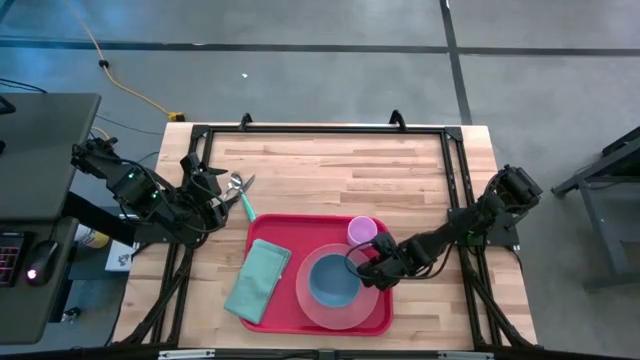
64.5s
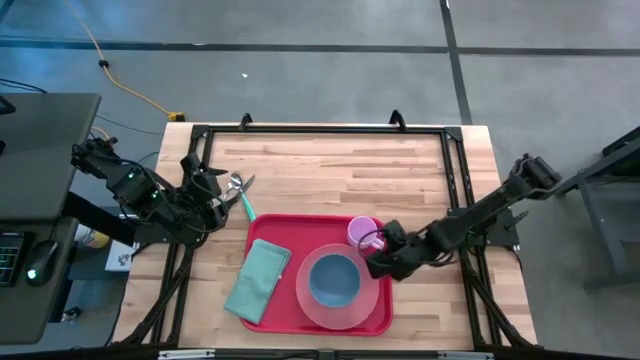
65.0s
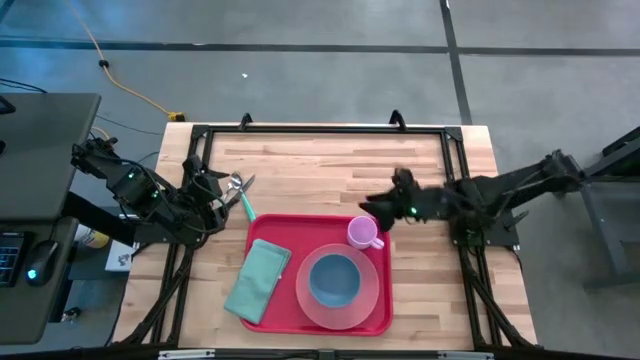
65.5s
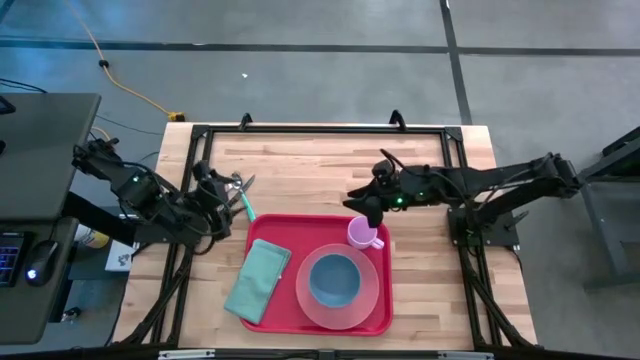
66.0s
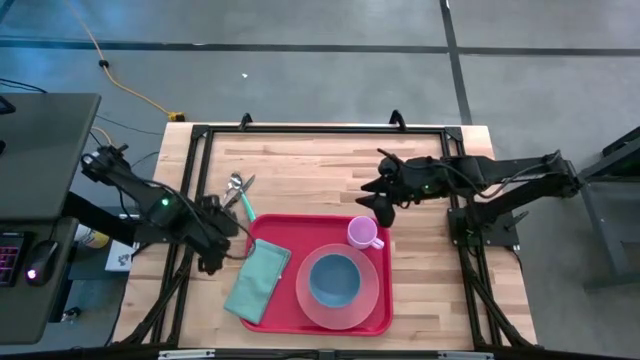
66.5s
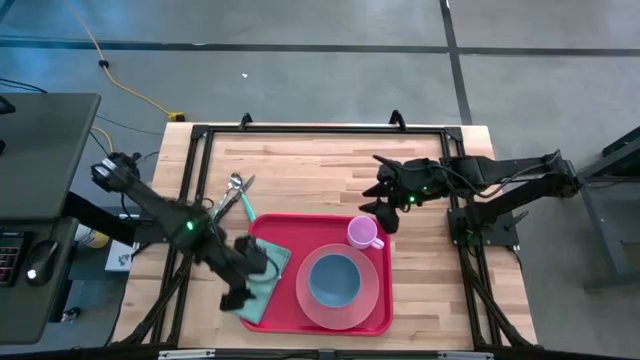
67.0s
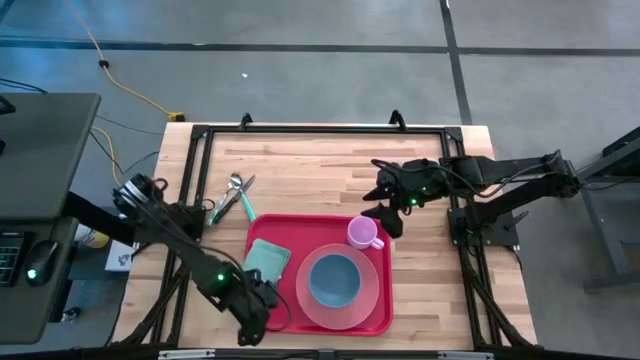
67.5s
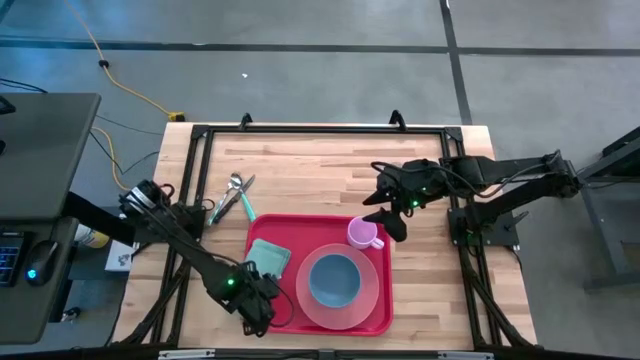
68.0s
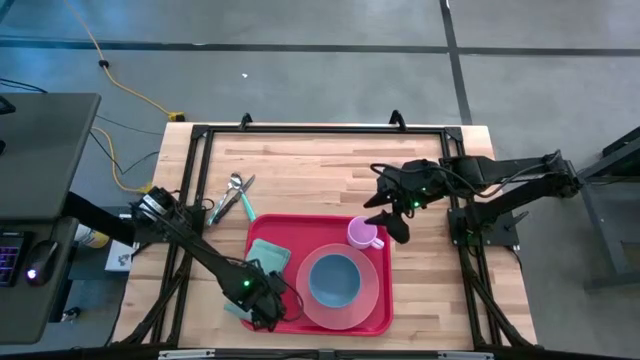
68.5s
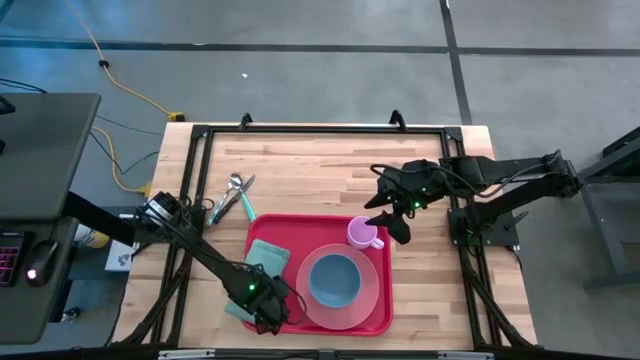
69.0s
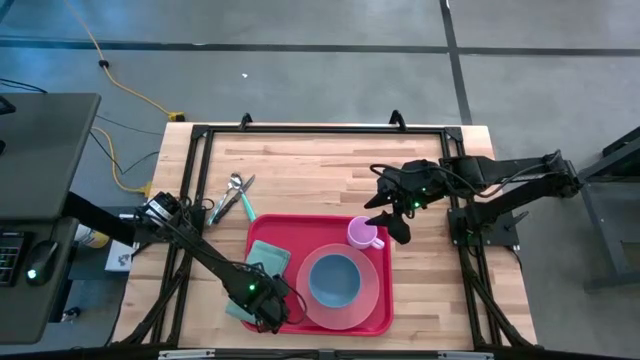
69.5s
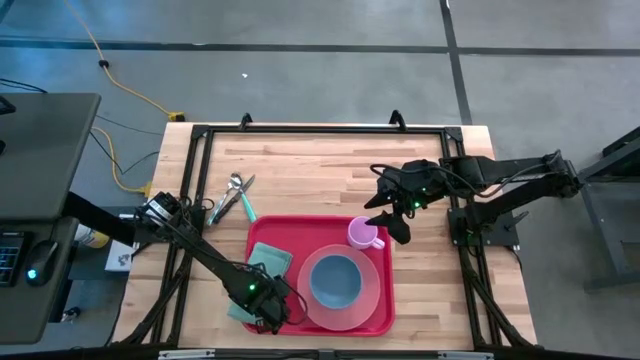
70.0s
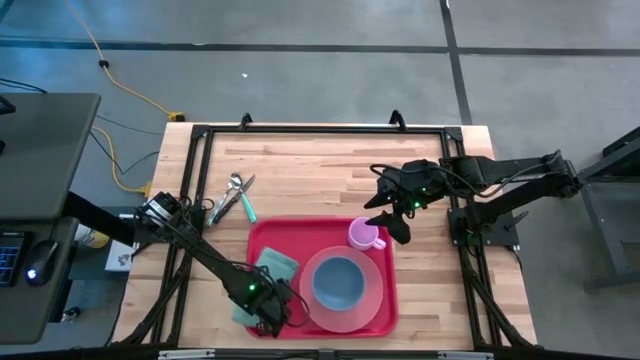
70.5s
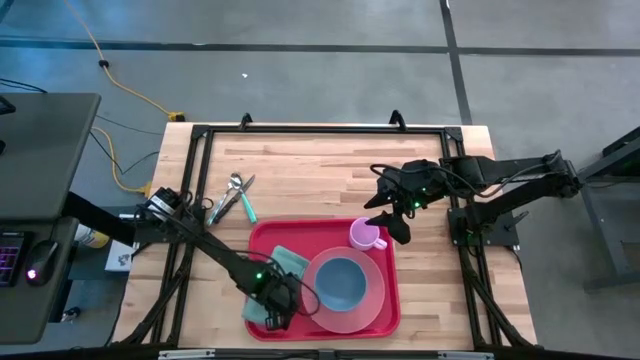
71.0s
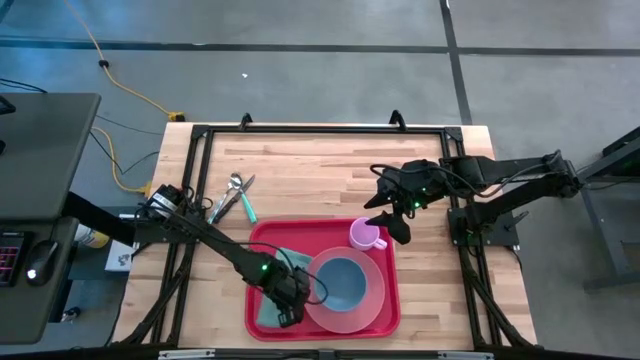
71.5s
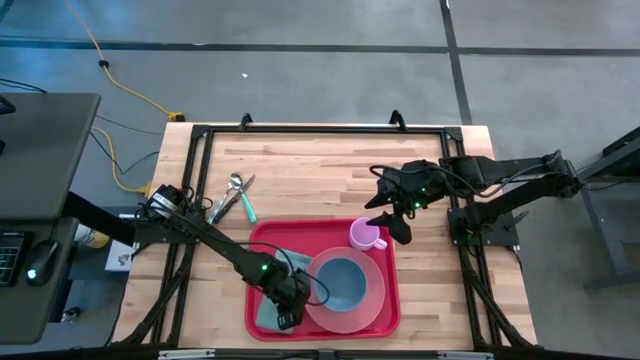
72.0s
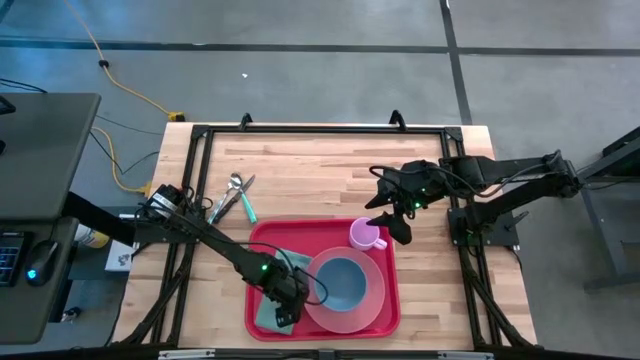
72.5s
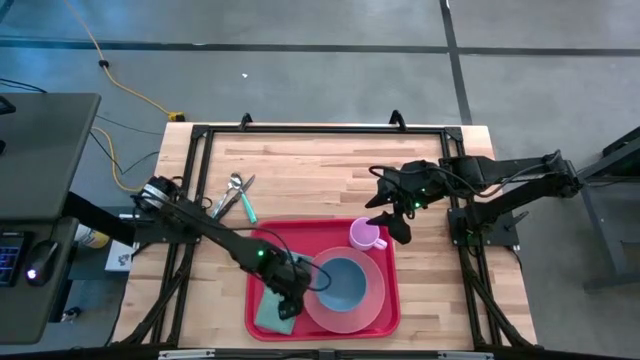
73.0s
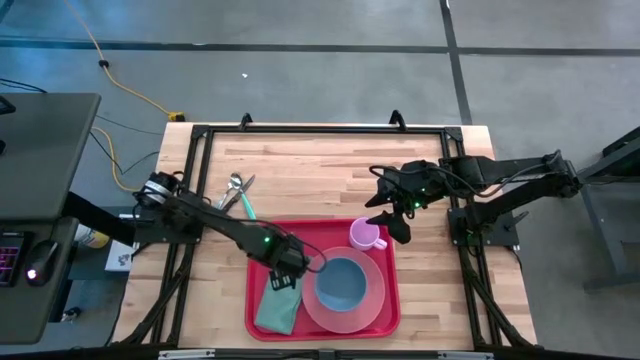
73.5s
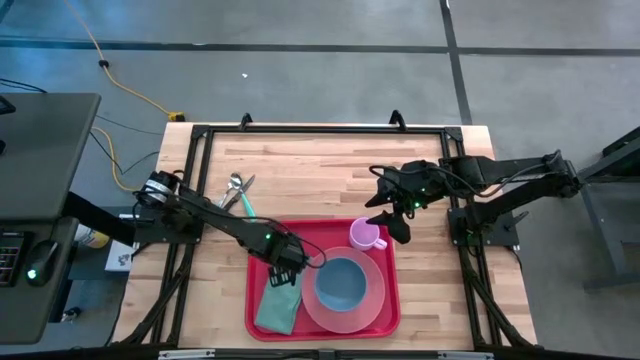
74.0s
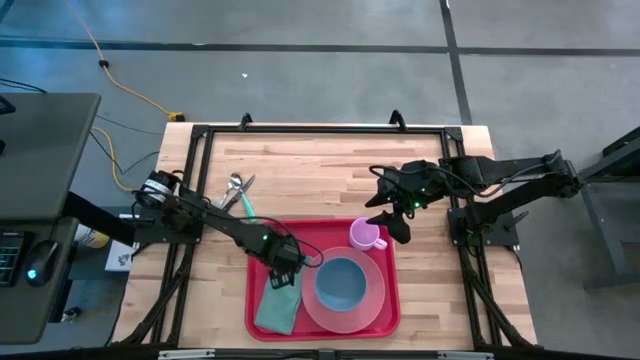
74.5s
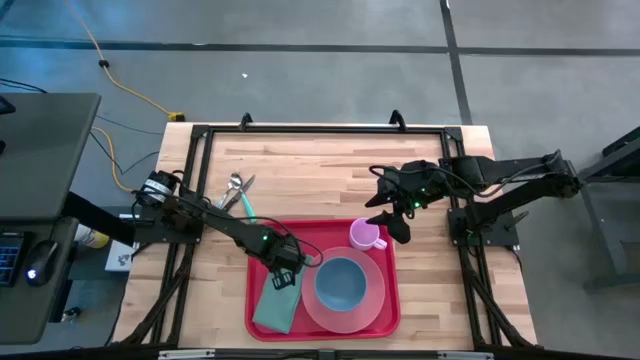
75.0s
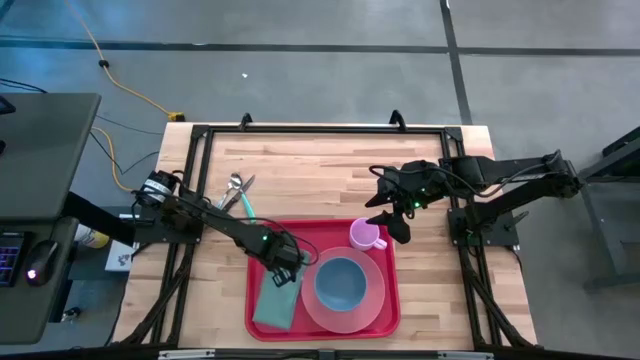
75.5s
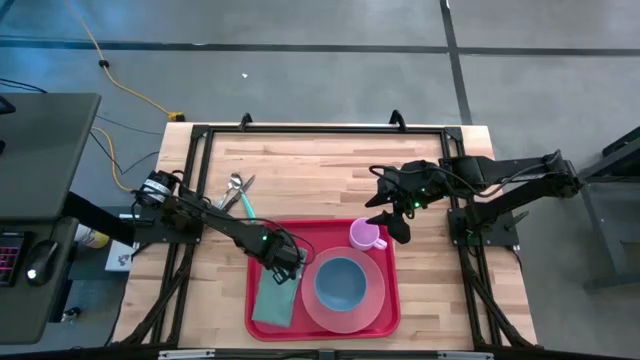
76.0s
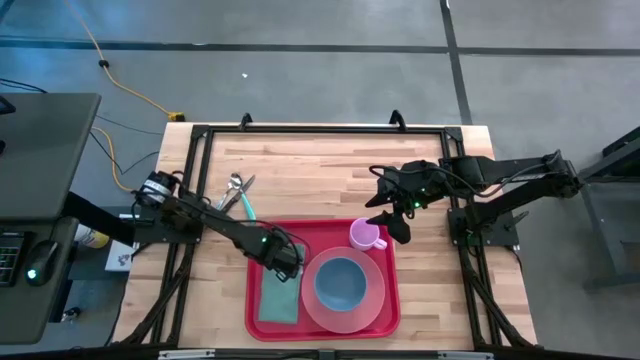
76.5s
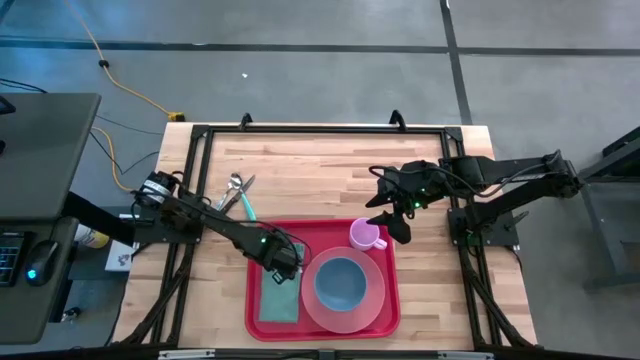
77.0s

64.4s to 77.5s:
Task: Set up tray
Adjust the light blue table napkin on the red serving tray

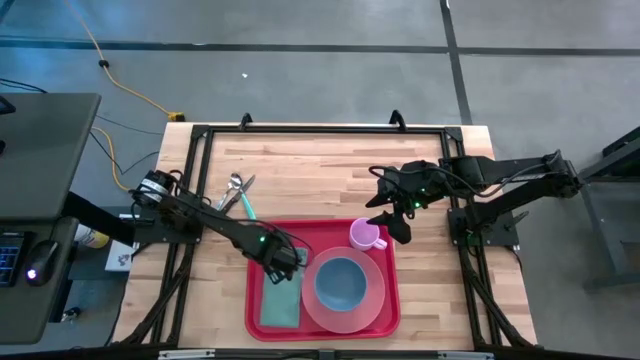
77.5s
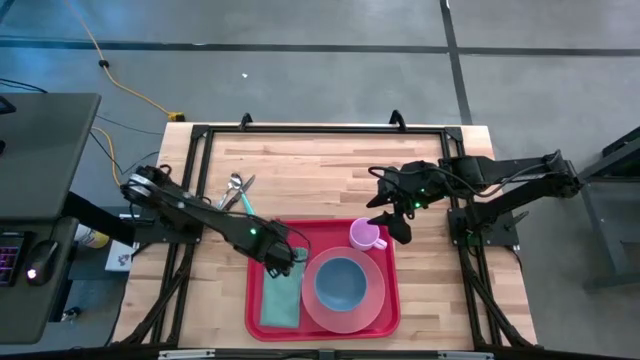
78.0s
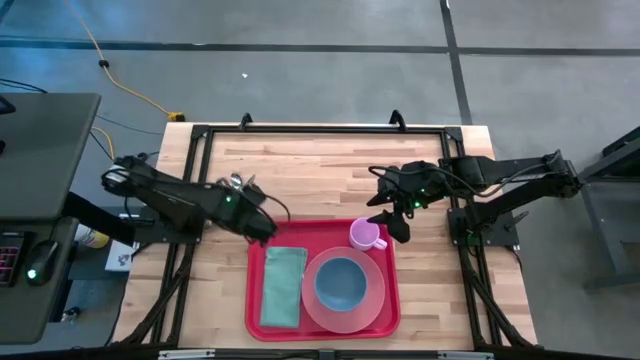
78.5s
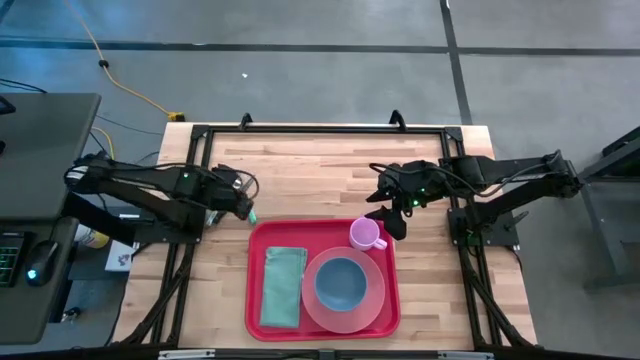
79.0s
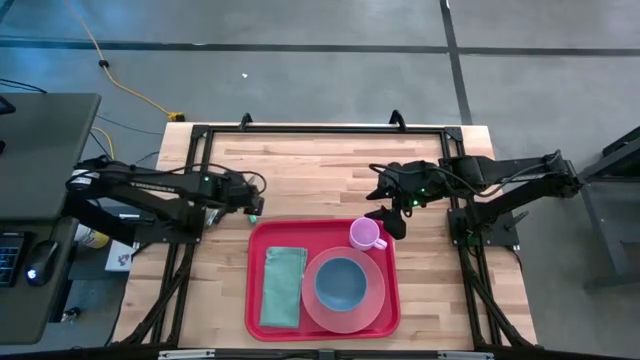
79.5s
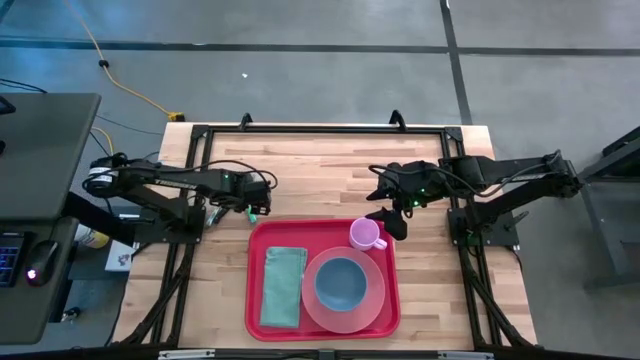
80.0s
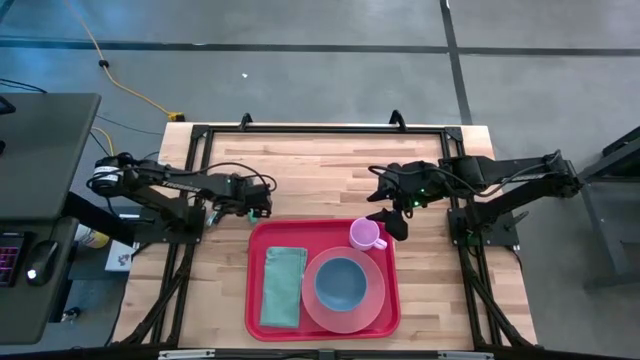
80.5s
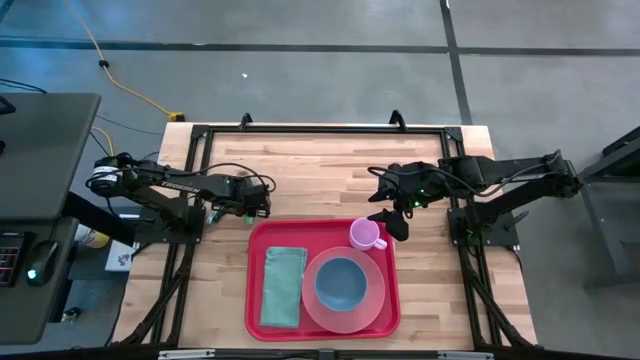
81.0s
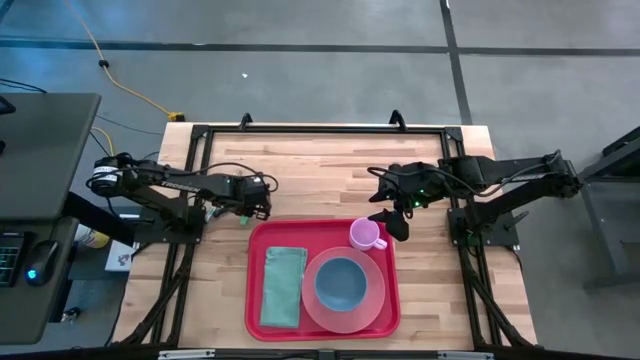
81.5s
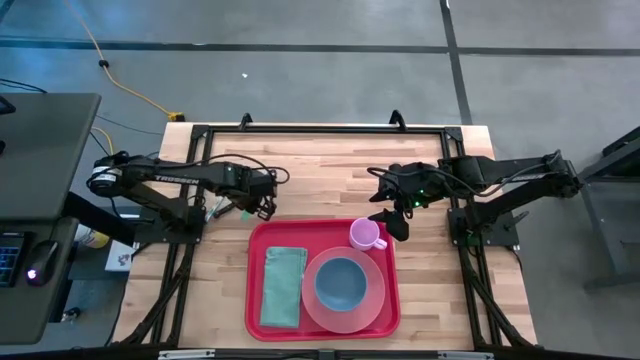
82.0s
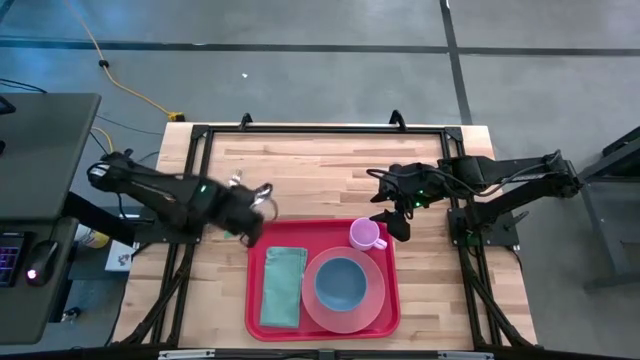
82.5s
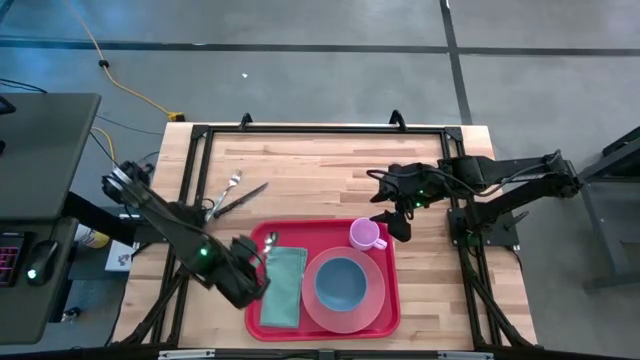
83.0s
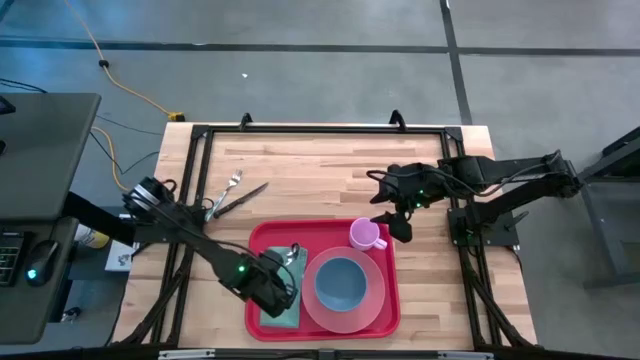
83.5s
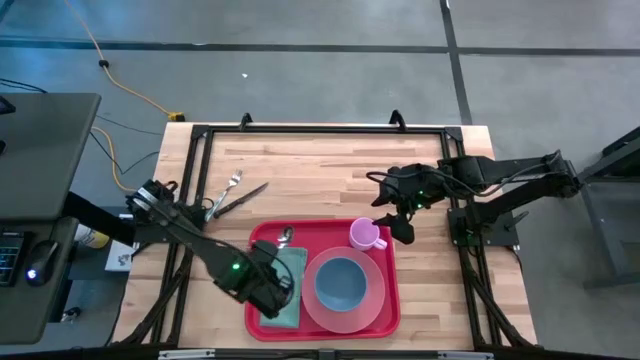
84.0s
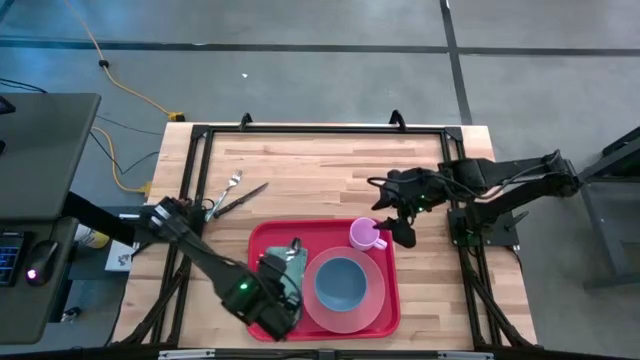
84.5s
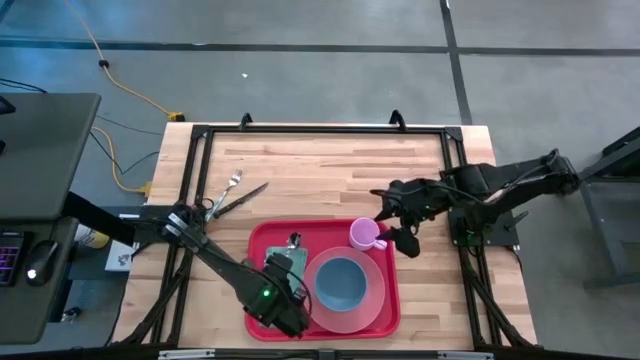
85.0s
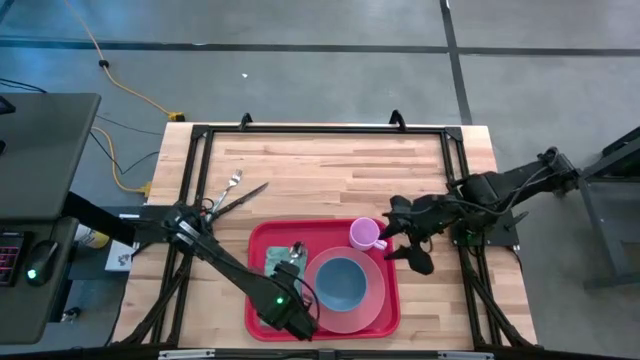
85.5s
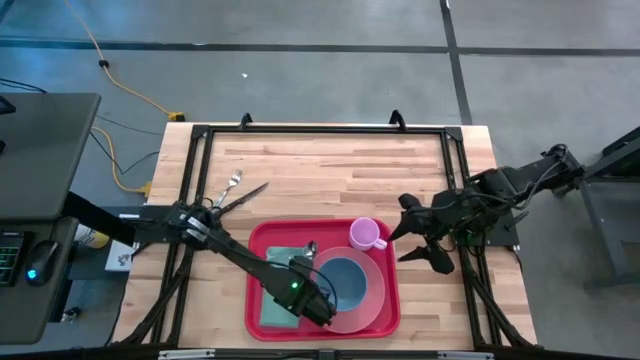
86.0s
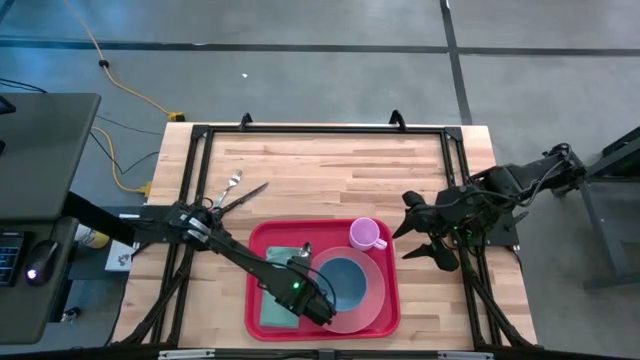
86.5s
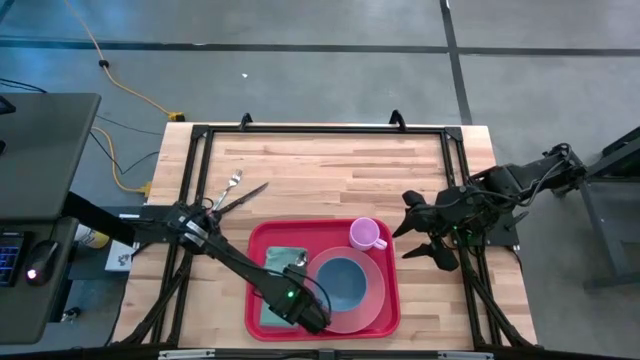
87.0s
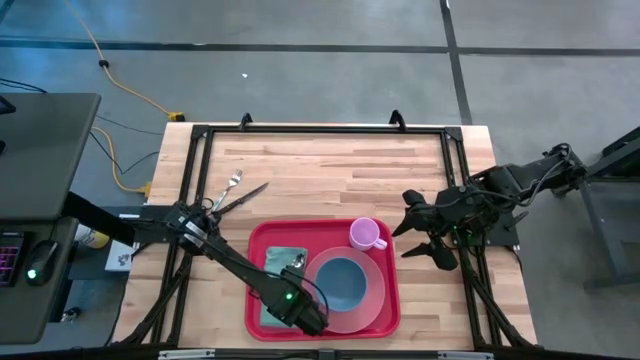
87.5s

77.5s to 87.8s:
Put the blue spoon on top of the light blue table napkin
